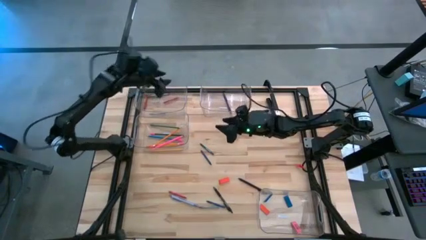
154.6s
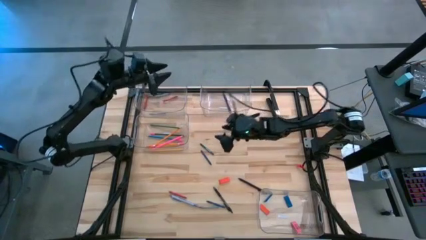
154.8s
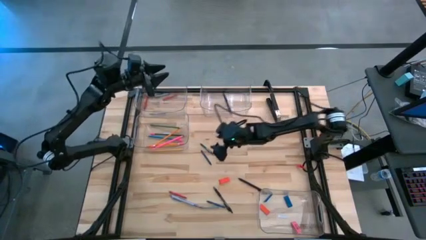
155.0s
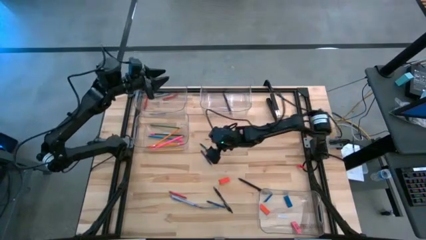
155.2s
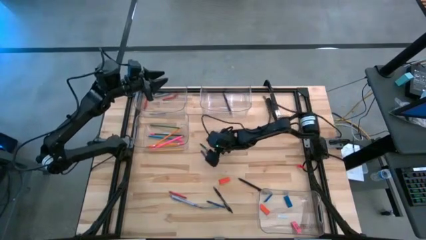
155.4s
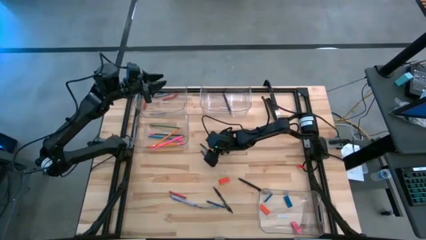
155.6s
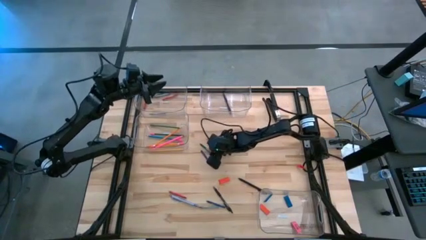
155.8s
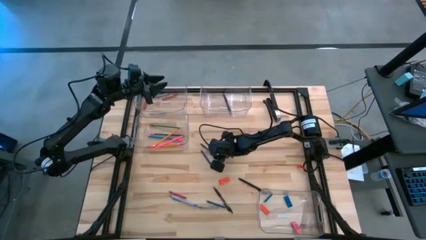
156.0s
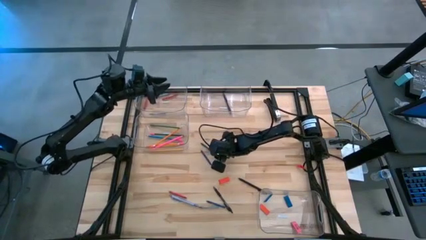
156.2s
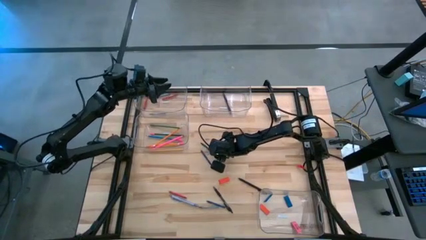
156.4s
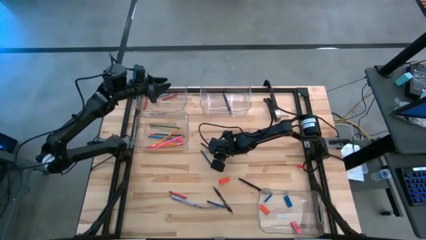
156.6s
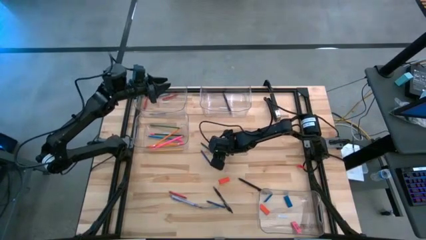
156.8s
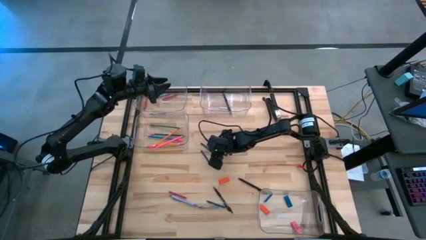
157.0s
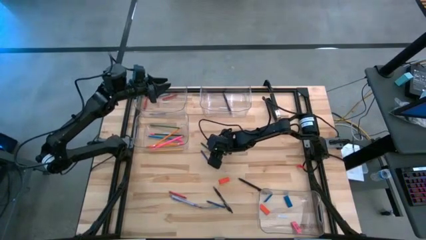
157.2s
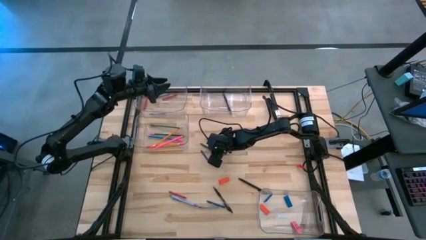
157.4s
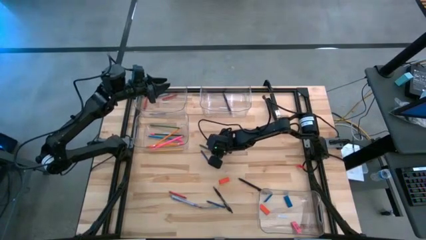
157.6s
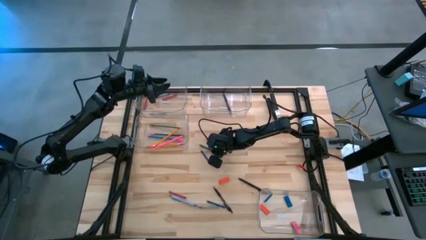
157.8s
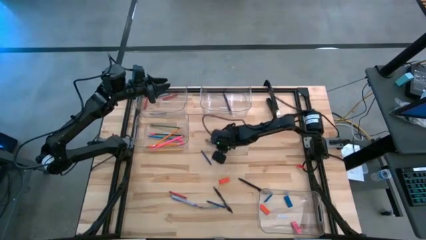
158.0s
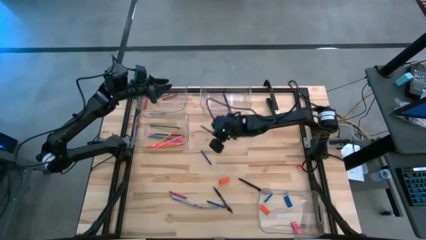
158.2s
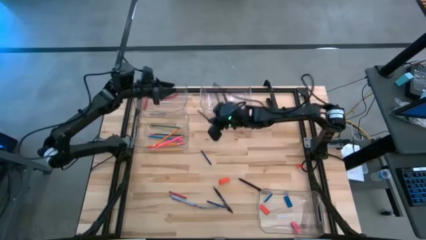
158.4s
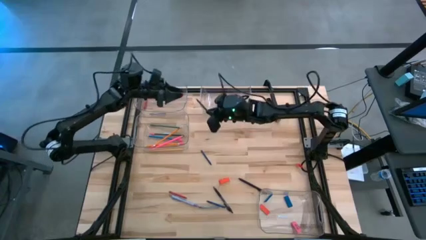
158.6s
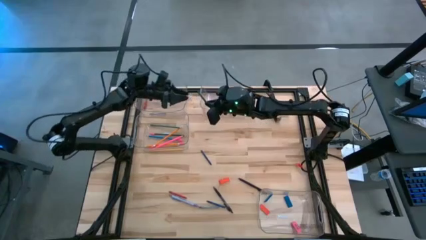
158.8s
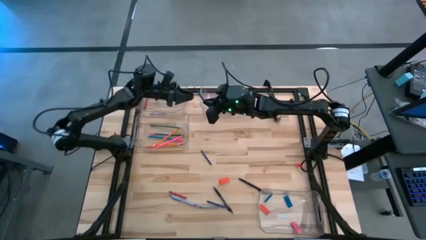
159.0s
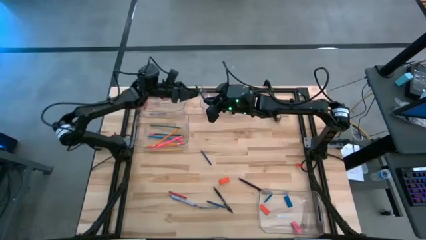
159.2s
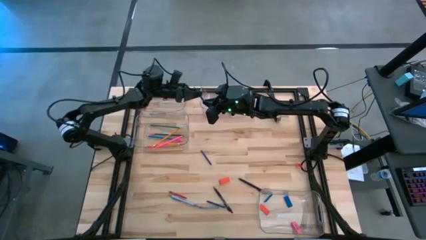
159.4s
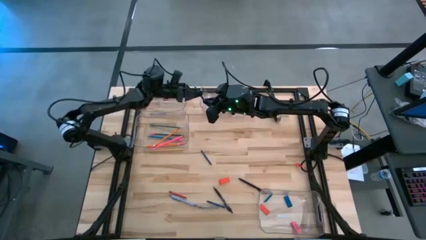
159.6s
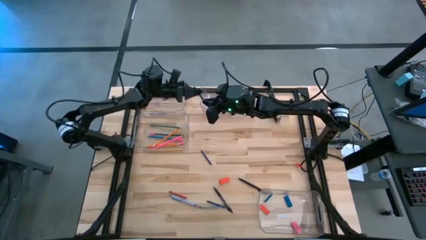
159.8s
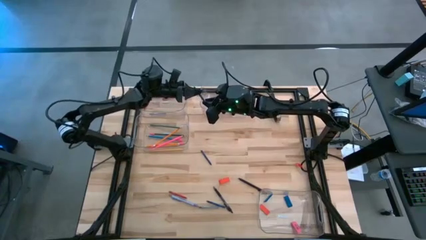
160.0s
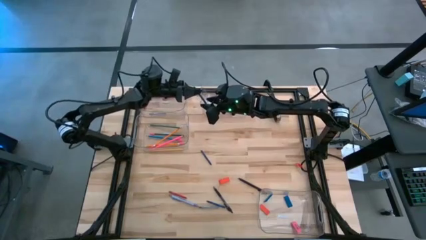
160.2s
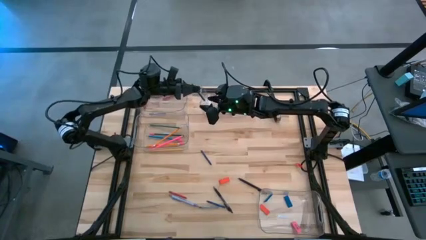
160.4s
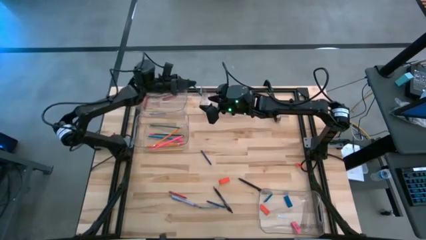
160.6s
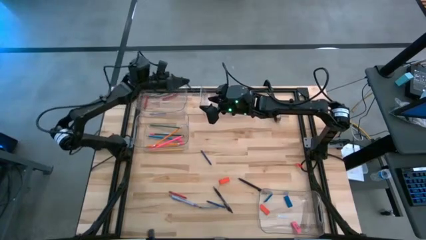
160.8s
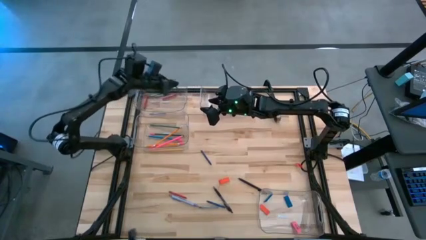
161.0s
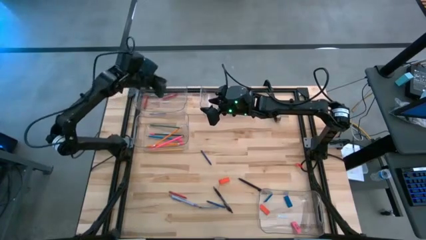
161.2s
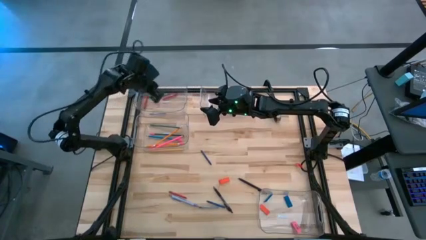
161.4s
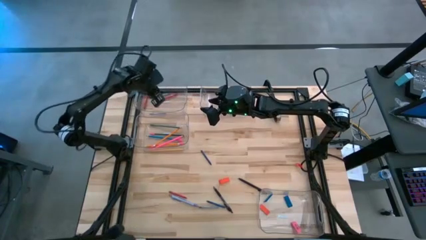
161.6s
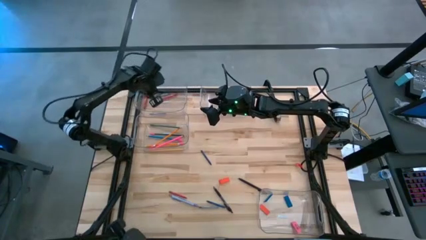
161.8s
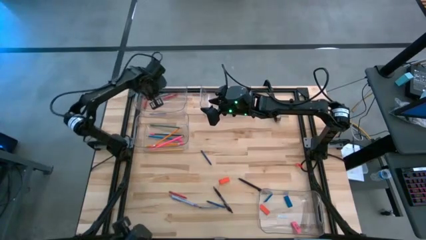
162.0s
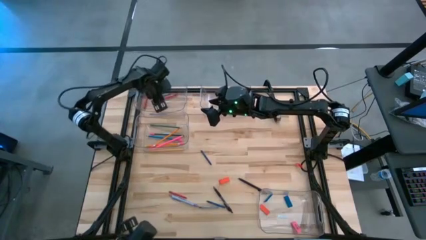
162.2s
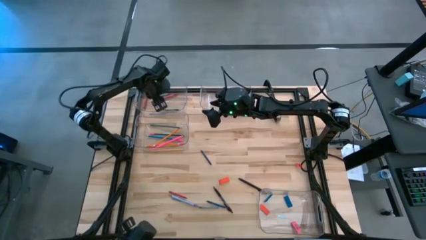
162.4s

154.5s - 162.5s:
Task: Sort crayons/erasers/pens/pencils in bins
Put the green crayon into the top left transparent bin

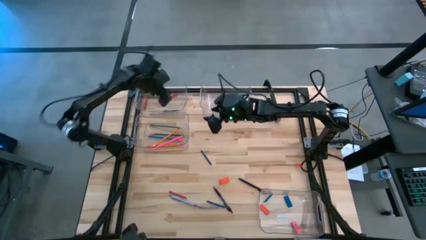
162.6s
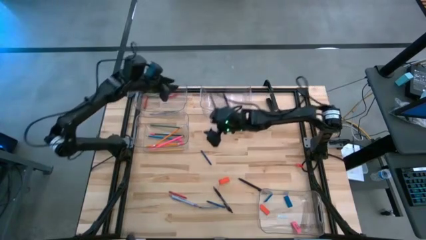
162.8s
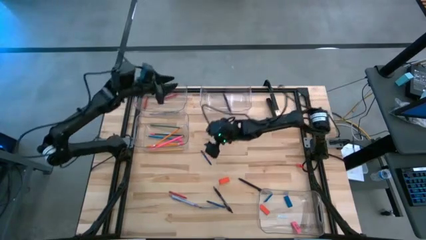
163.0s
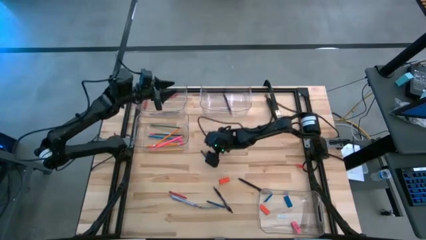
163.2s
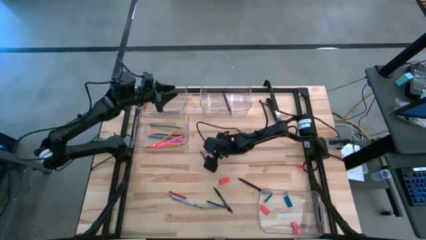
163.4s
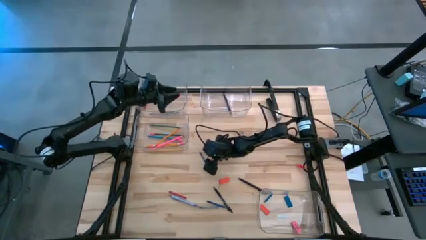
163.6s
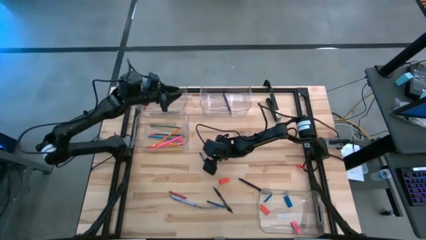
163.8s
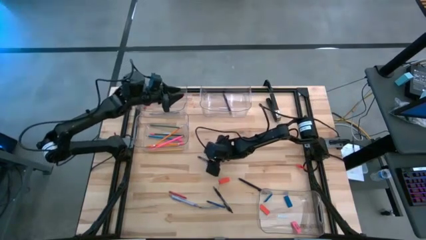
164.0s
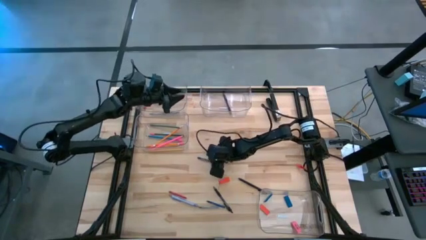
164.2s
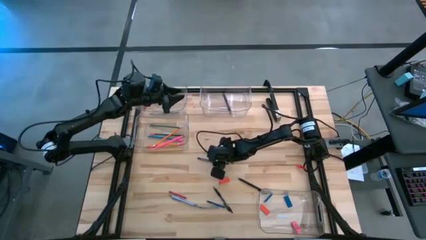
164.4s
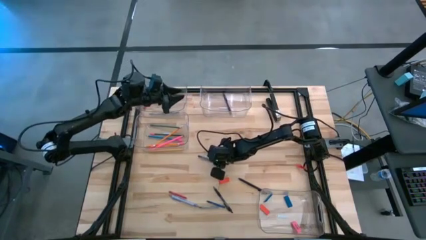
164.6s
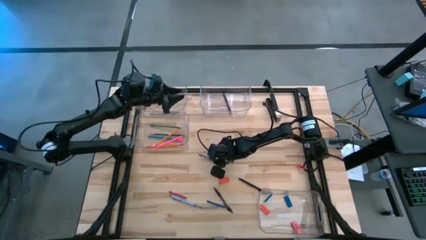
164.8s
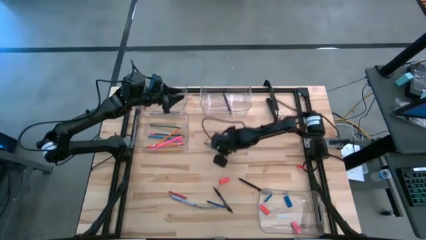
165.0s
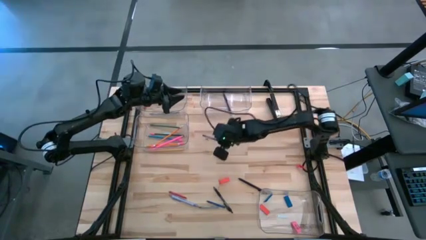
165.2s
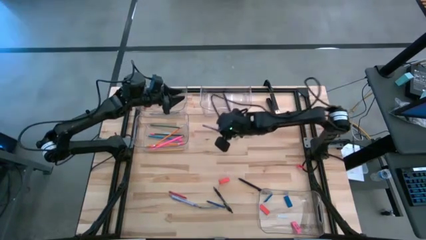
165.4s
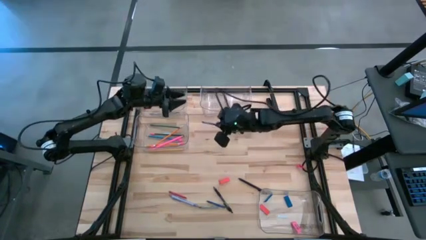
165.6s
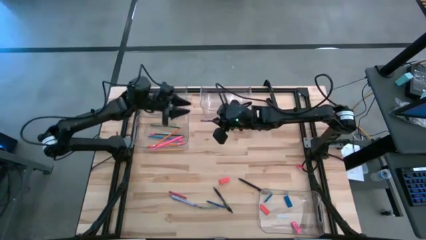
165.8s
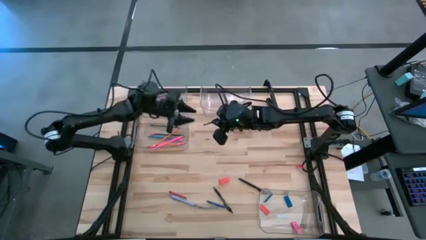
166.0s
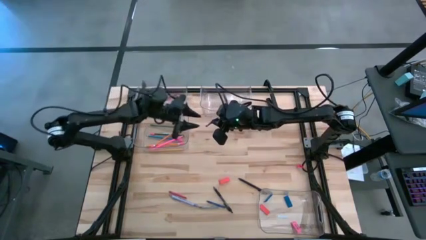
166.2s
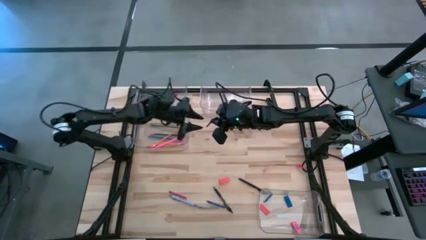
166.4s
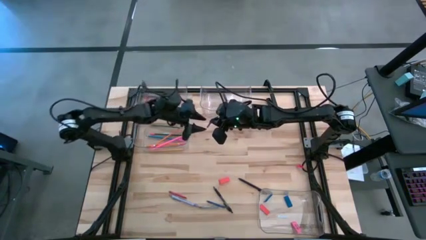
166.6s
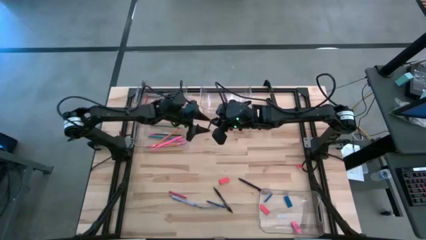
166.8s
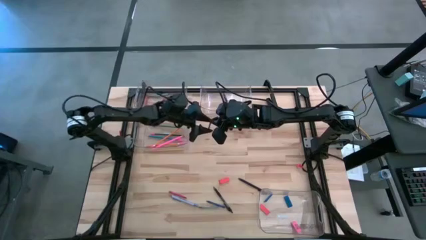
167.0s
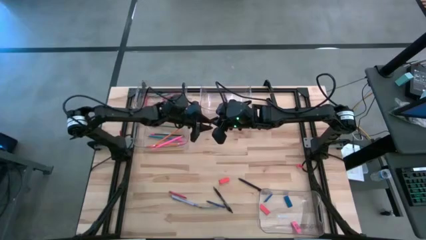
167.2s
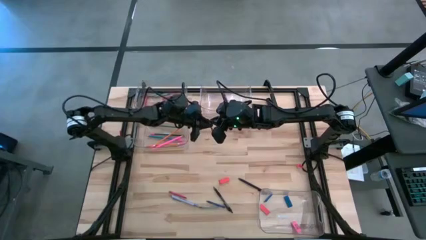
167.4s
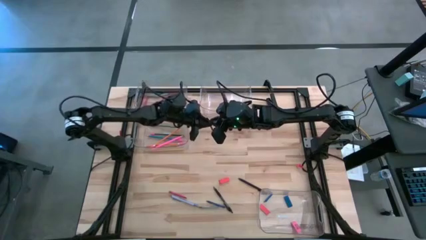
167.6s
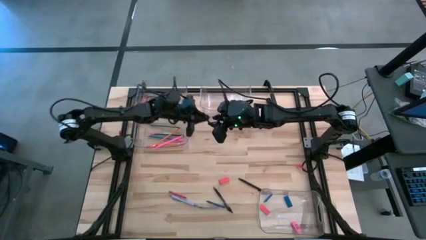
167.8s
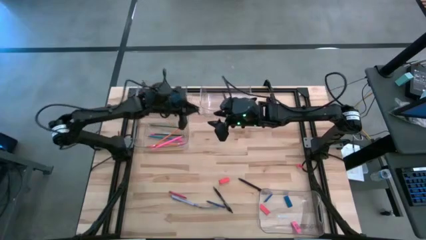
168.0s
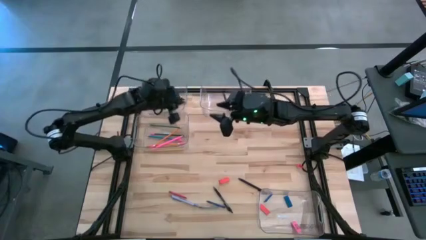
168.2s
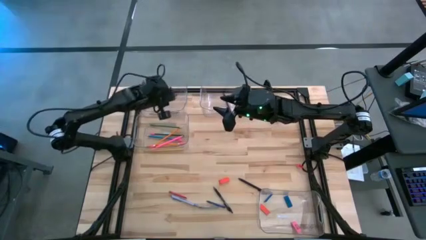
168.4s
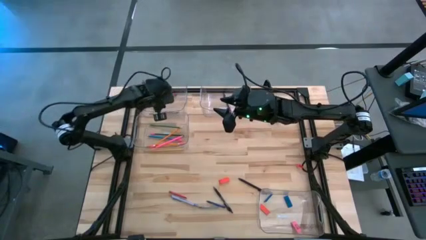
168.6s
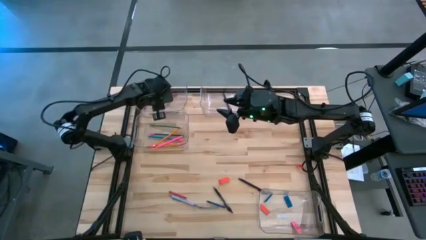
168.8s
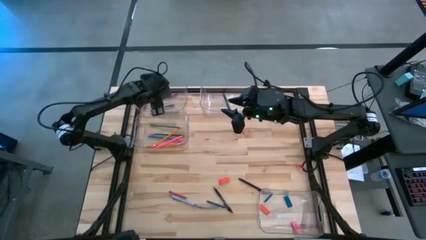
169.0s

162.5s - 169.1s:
Put the blue crayon into the top left transparent bin

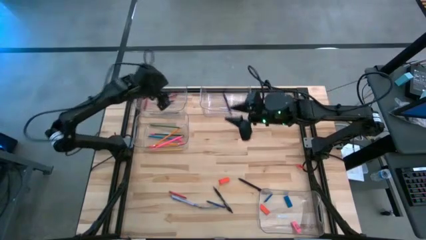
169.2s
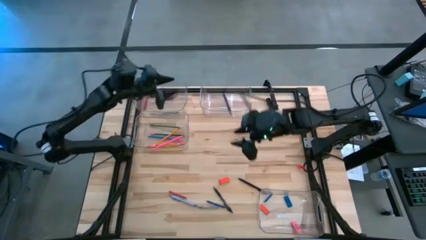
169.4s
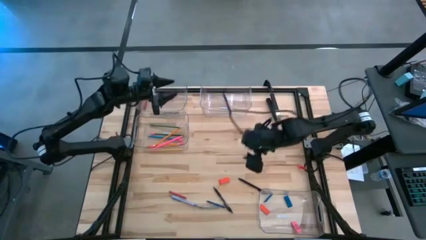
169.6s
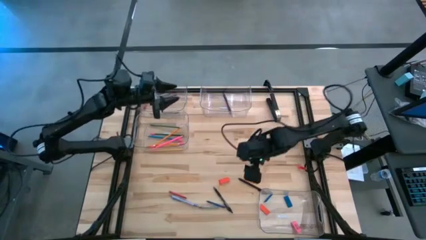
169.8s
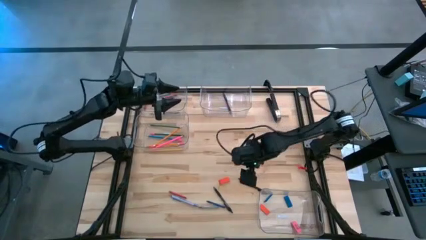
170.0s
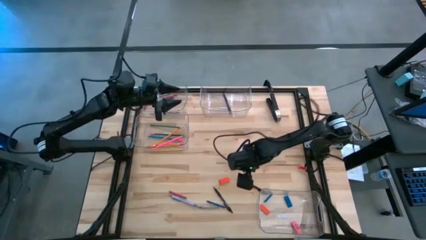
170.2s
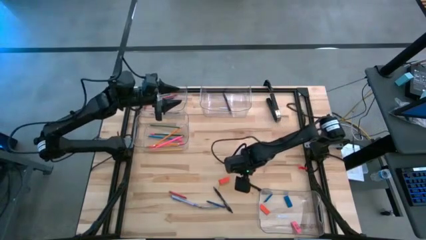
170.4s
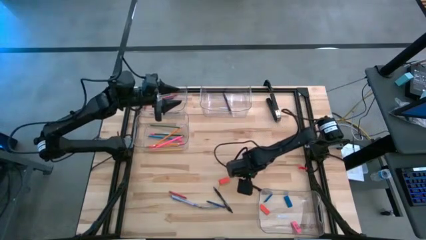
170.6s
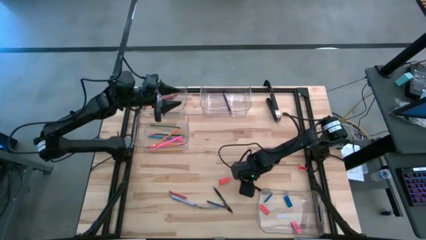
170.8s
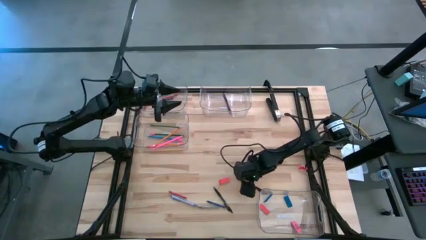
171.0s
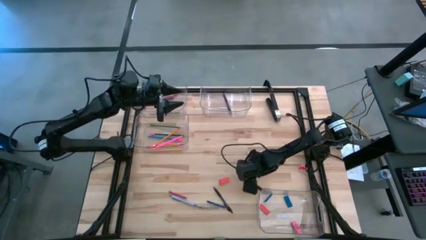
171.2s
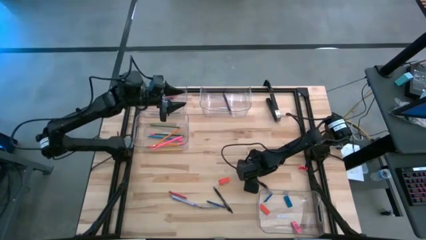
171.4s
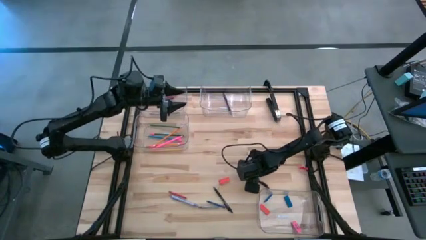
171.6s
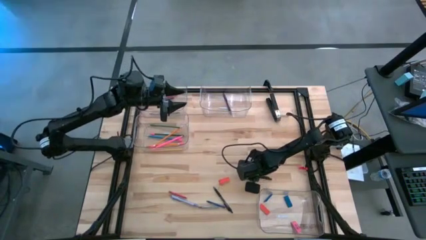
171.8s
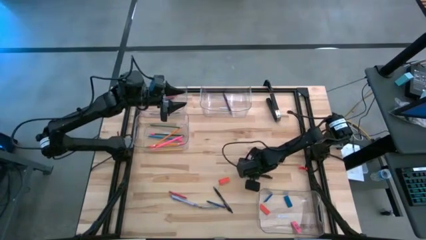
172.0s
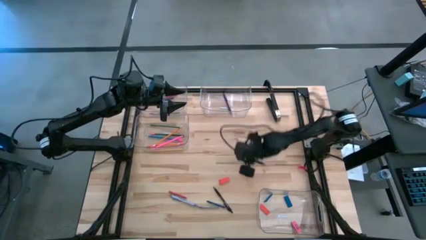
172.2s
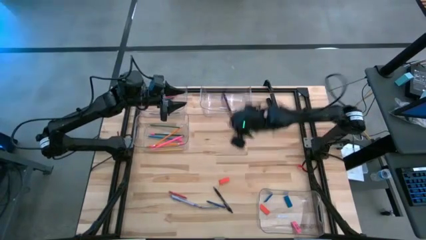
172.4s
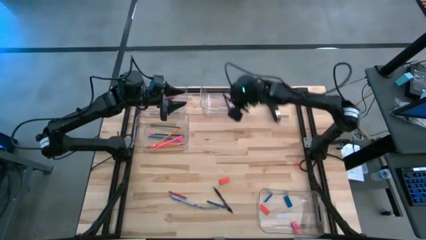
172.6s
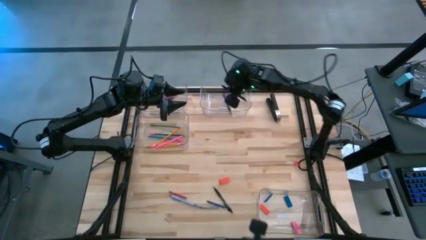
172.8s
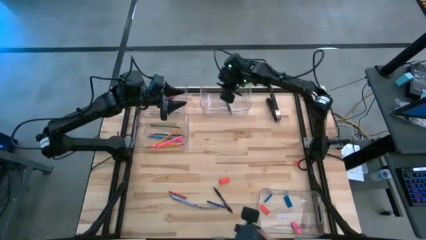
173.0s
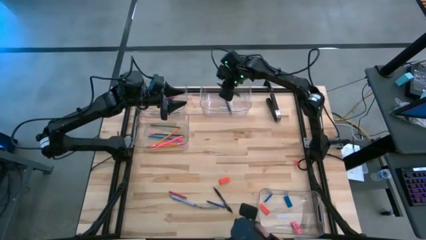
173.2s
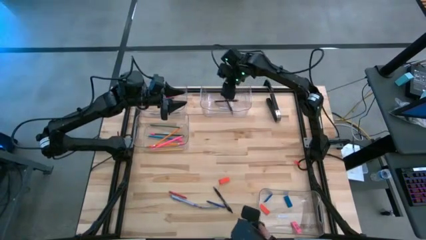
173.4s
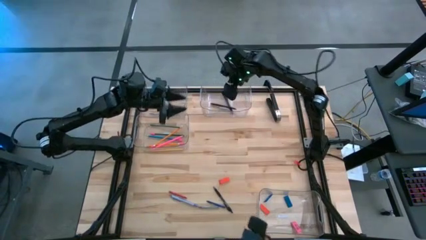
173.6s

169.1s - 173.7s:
Put the black pen into the top right transparent bin
